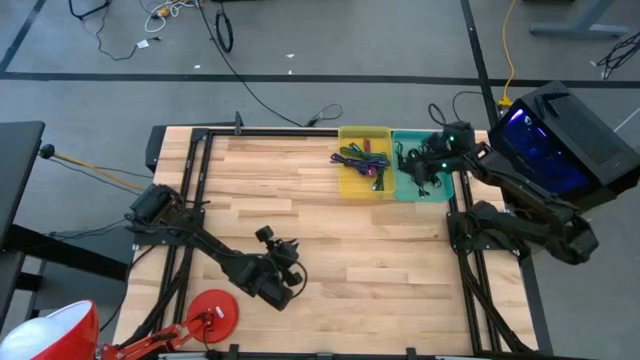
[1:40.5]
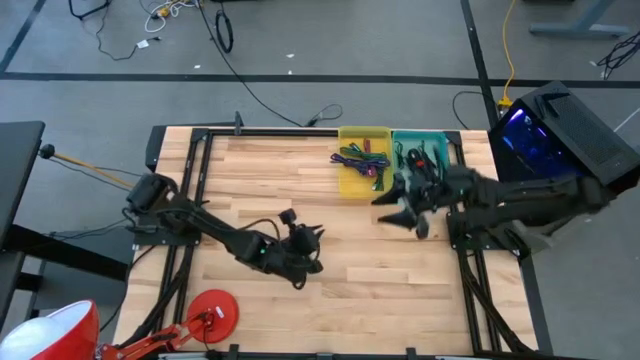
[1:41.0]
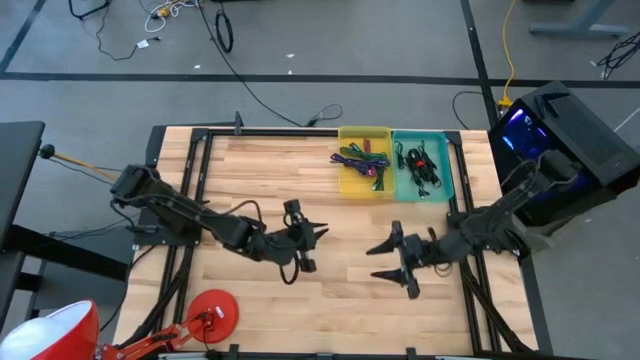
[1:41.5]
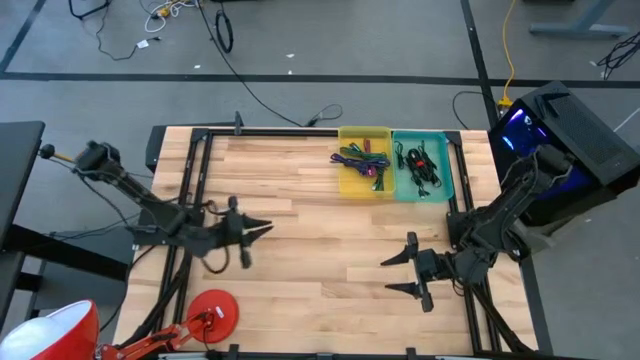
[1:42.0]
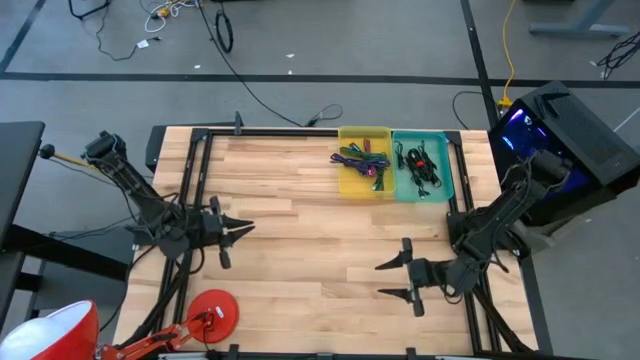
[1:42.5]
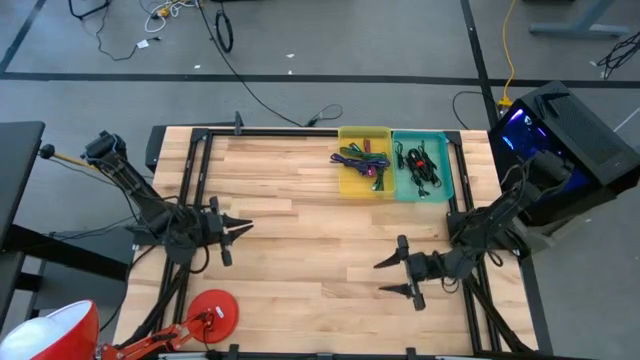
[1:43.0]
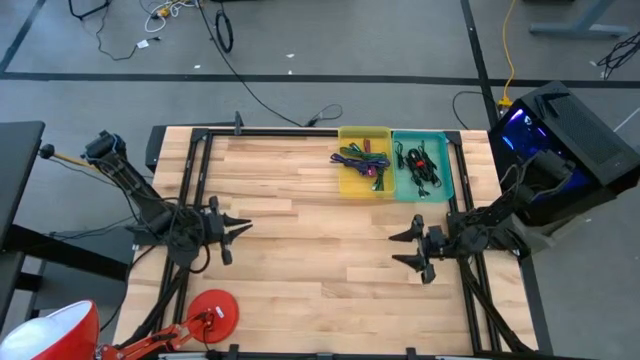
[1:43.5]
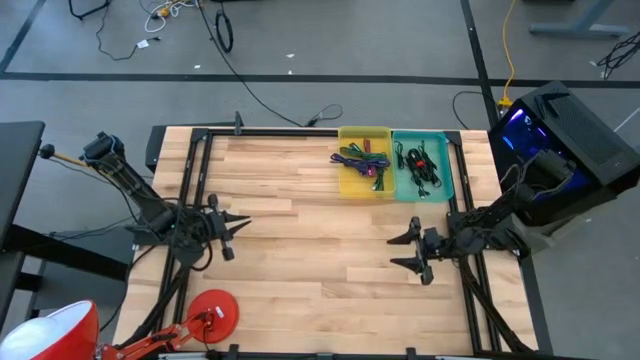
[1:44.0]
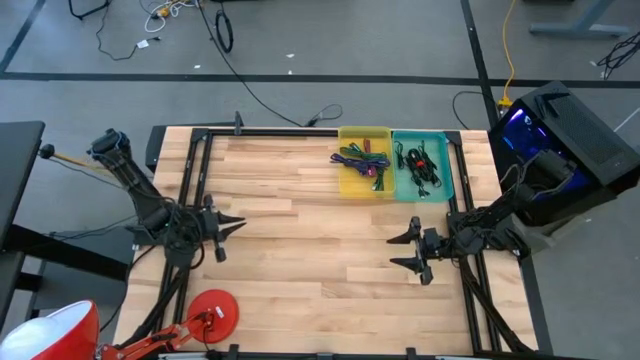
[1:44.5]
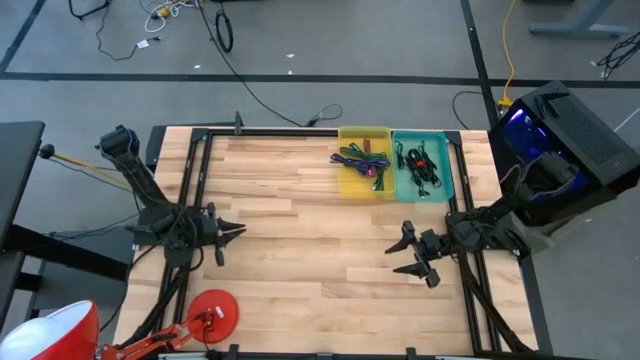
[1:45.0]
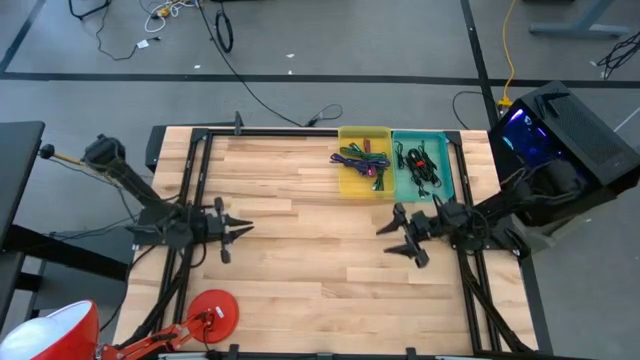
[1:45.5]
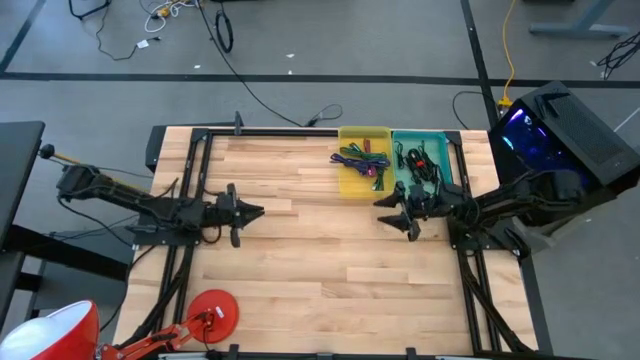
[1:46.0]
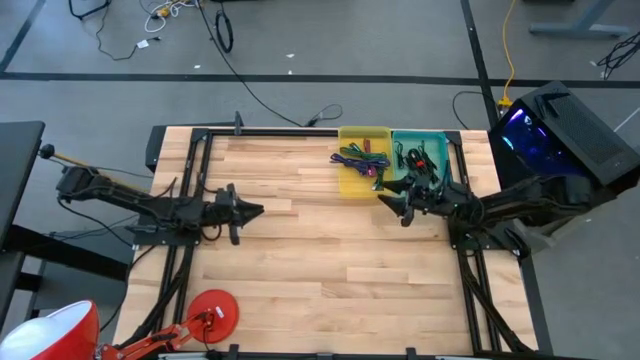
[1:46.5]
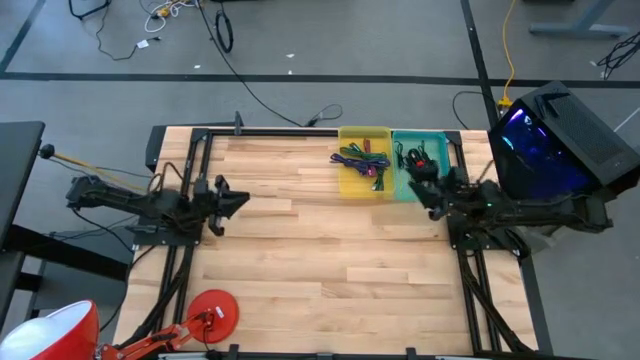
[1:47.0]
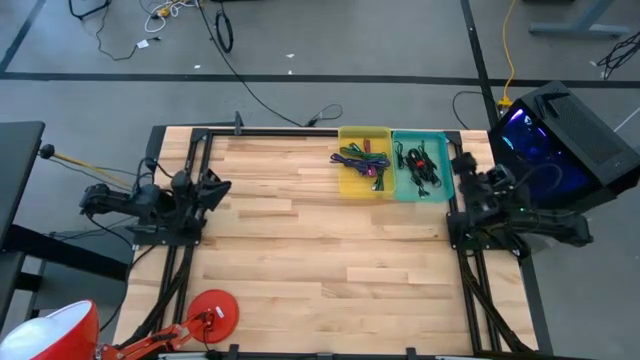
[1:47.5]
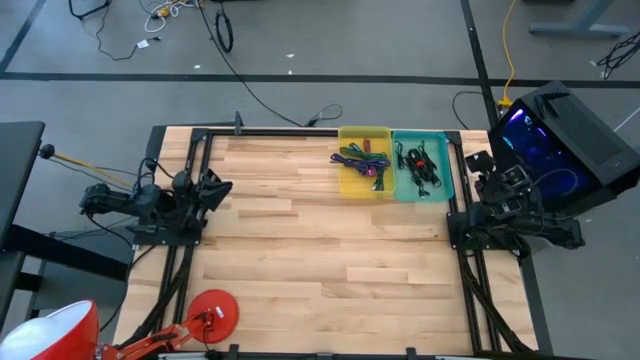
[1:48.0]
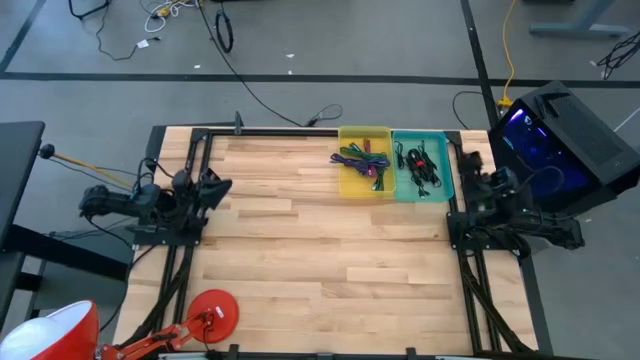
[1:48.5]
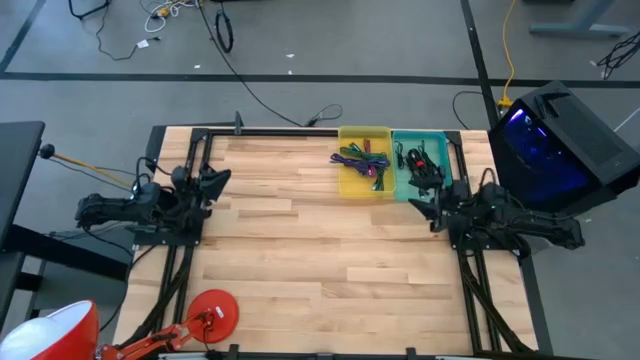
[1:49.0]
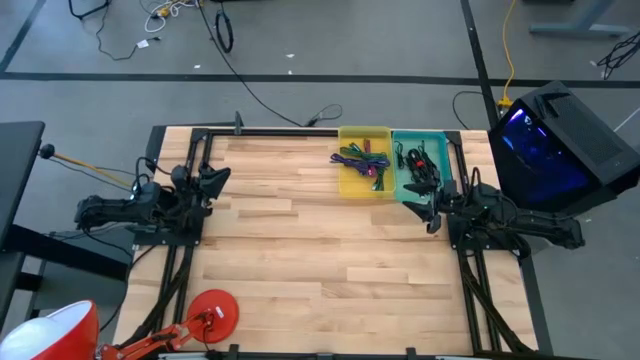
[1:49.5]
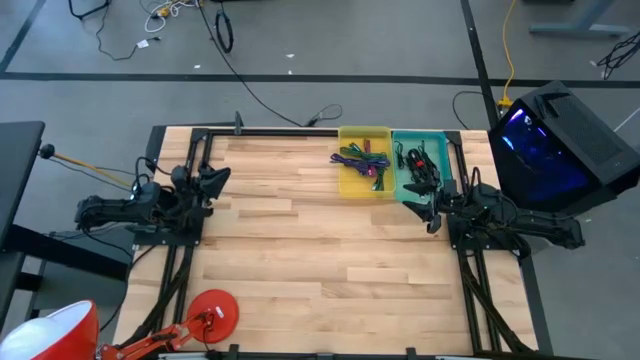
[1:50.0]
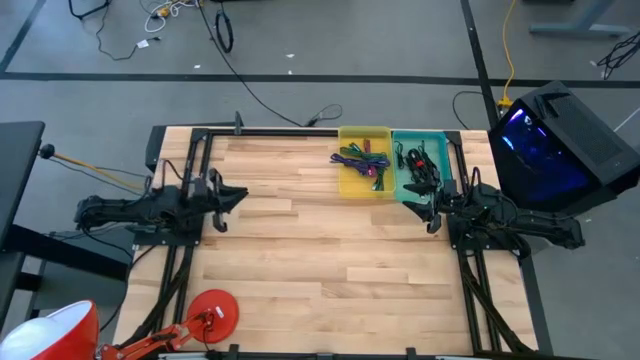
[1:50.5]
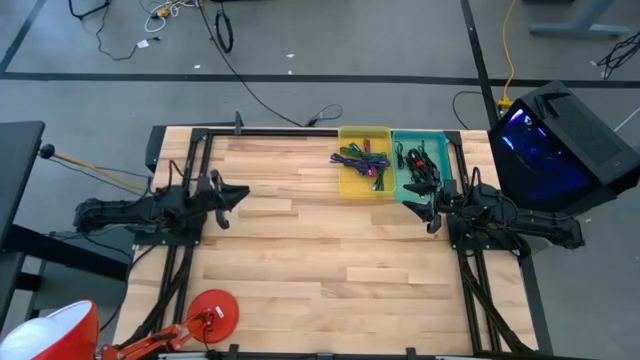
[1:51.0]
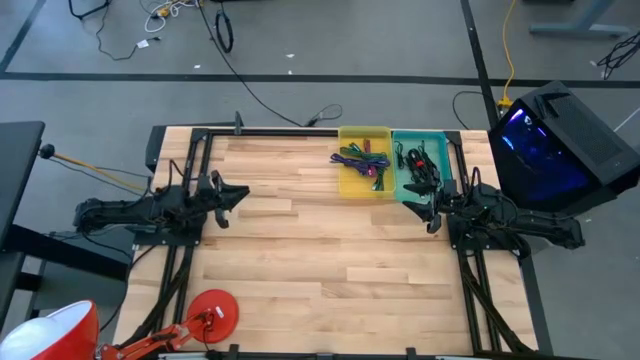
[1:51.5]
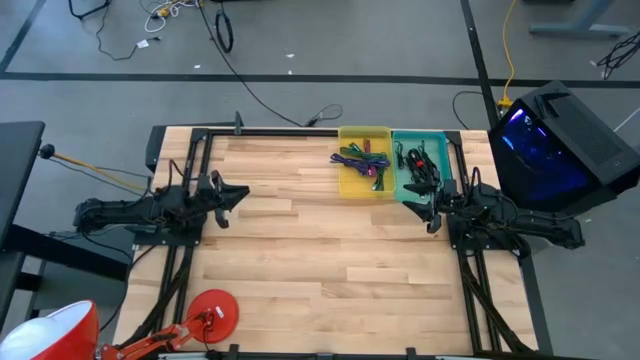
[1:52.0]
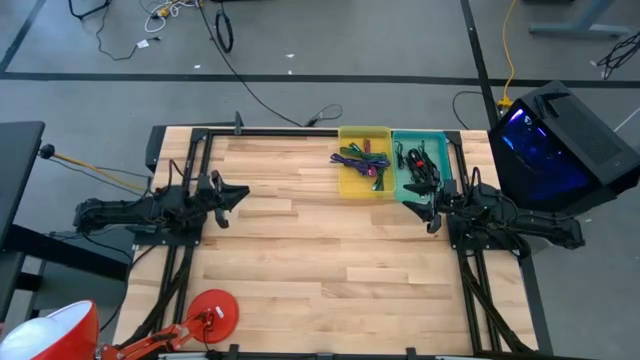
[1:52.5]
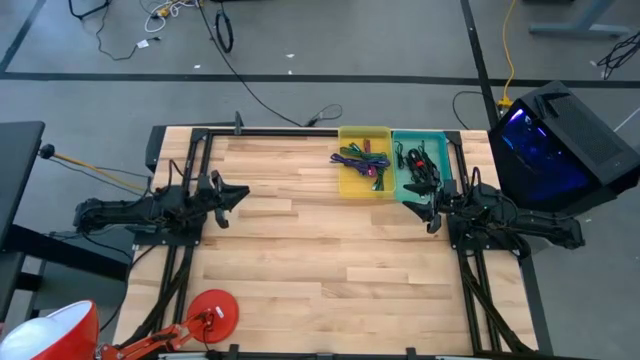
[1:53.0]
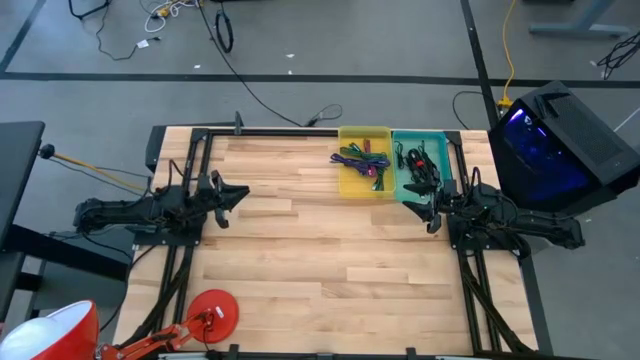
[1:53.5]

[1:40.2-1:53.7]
Task: Pick & Place USB Port
Return to Home Position

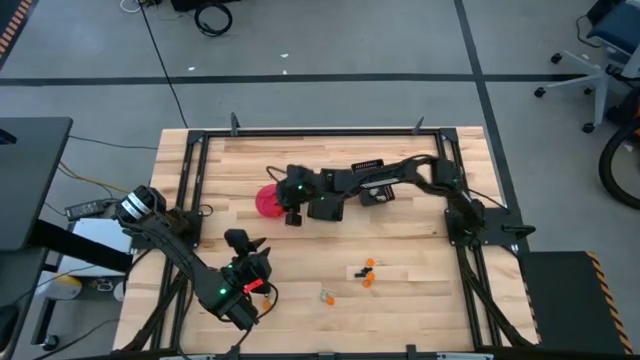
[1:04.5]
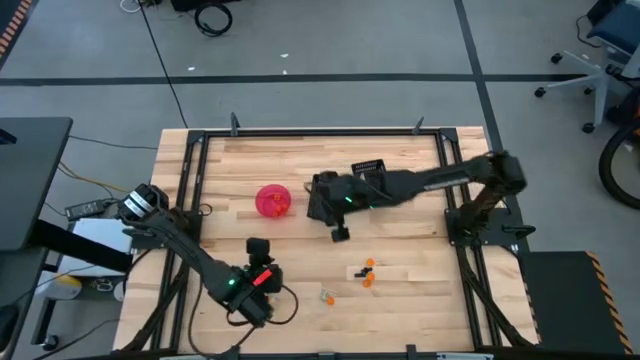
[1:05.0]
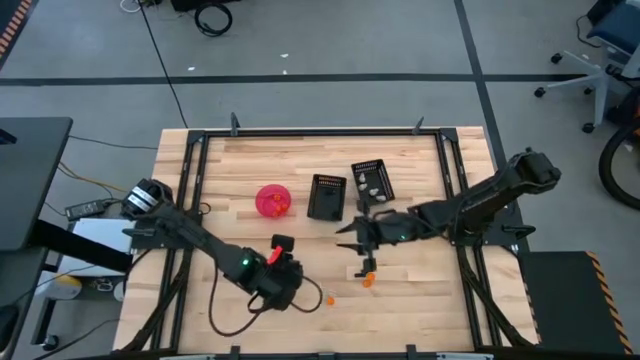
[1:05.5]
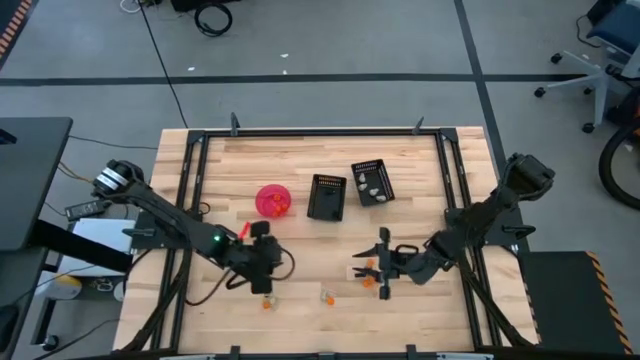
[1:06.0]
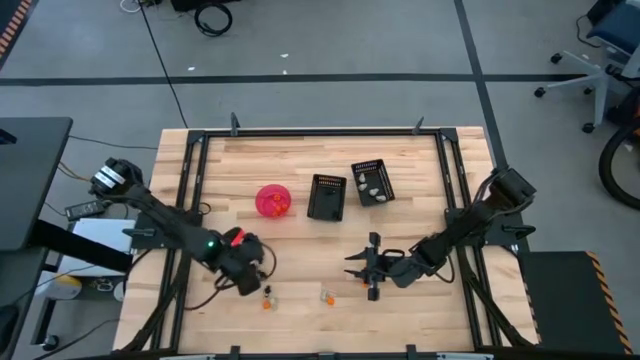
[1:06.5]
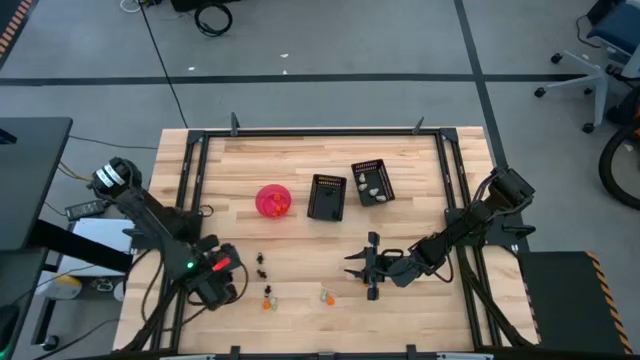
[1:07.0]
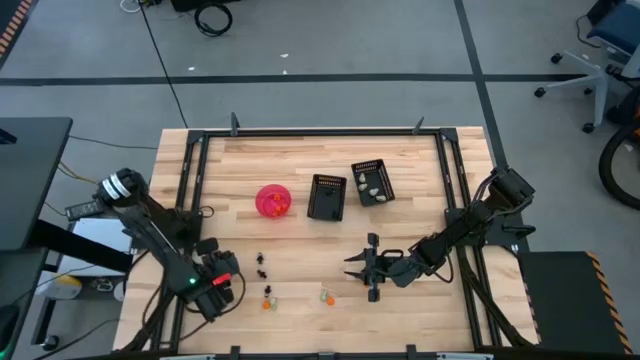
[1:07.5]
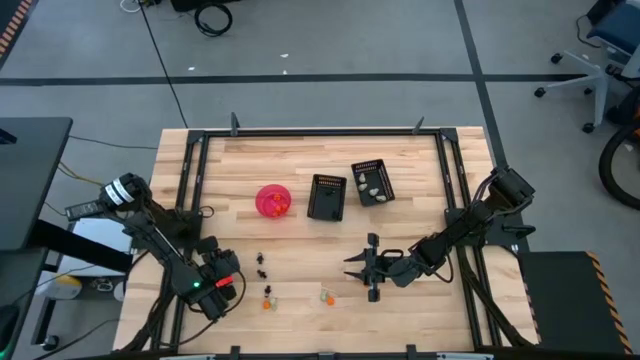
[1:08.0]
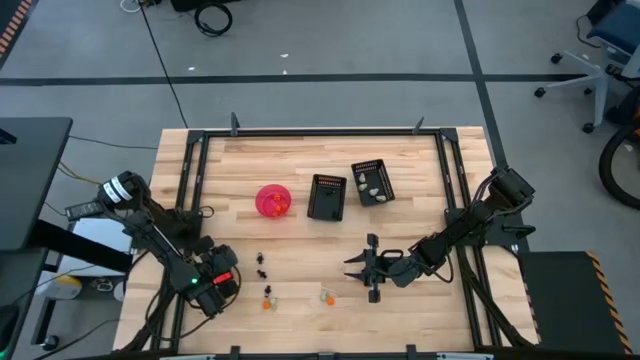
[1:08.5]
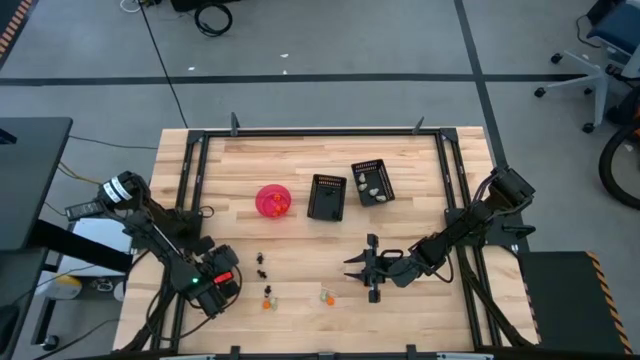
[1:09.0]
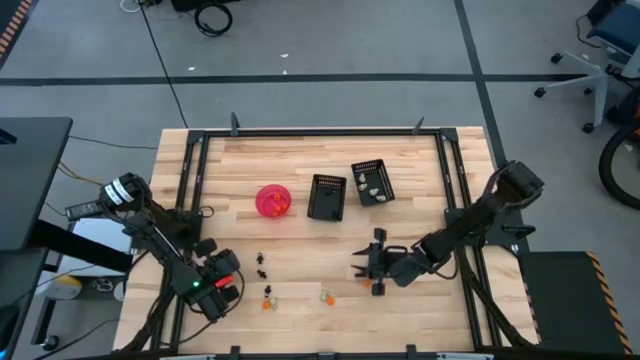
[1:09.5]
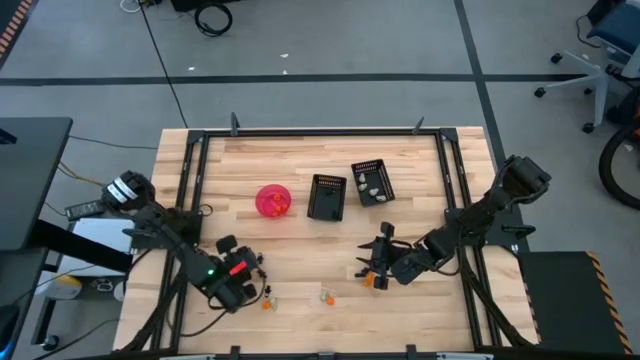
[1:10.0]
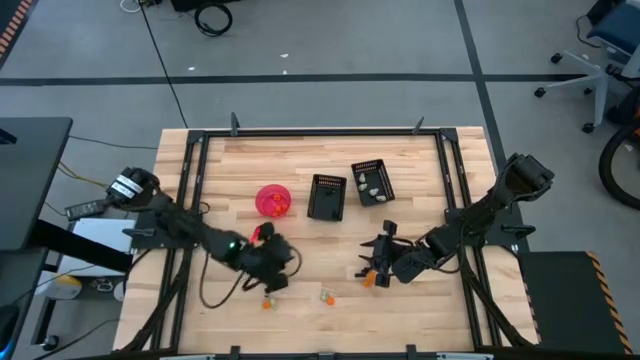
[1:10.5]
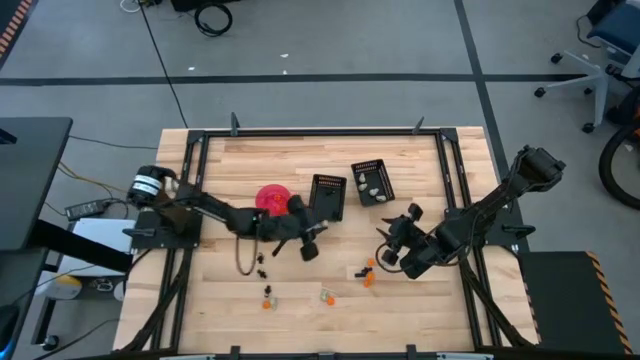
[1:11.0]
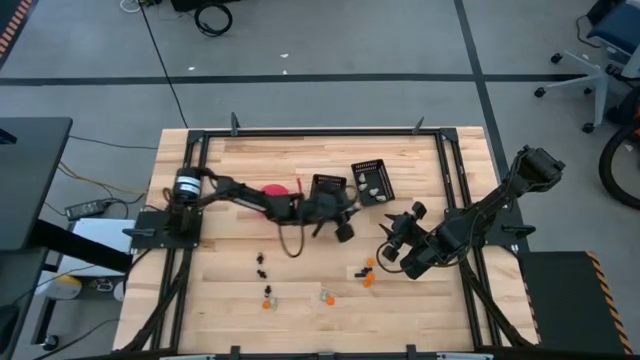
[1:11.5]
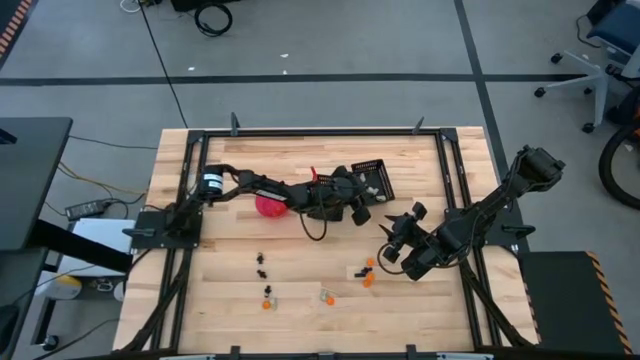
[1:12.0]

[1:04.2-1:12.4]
Task: Sort Halloween decoration
Put the white skull toy into the right black bin
